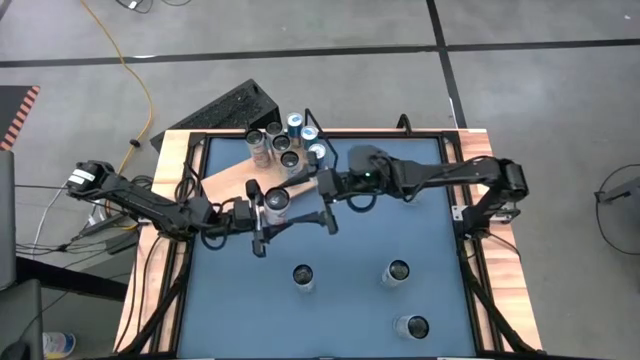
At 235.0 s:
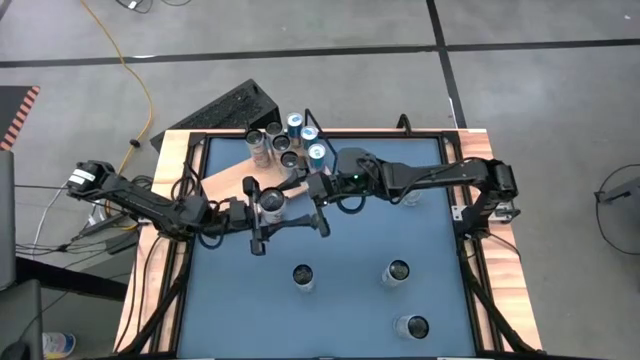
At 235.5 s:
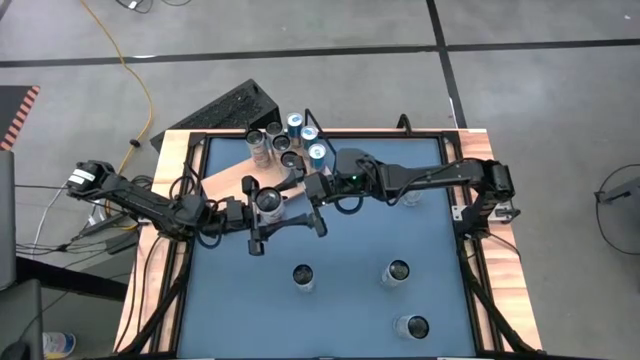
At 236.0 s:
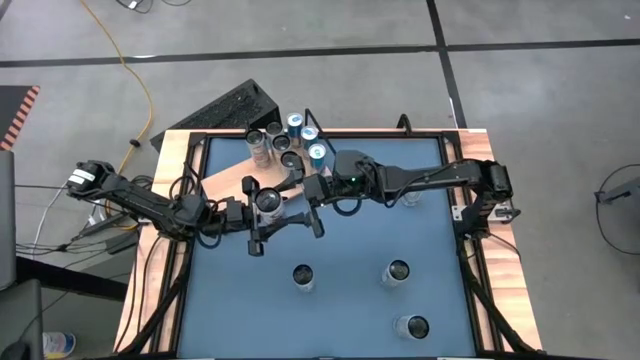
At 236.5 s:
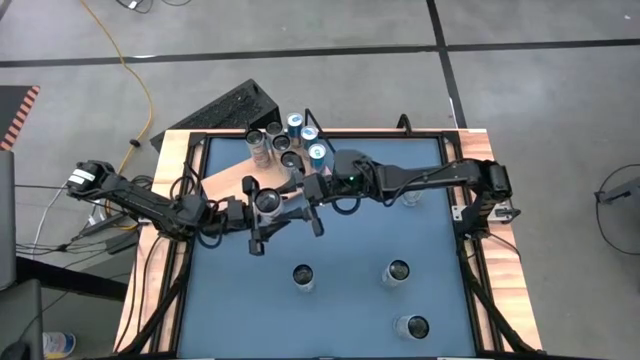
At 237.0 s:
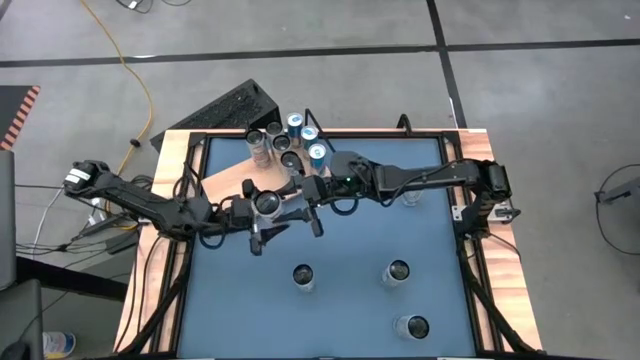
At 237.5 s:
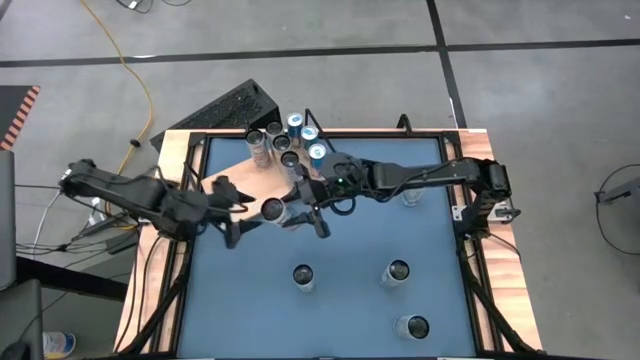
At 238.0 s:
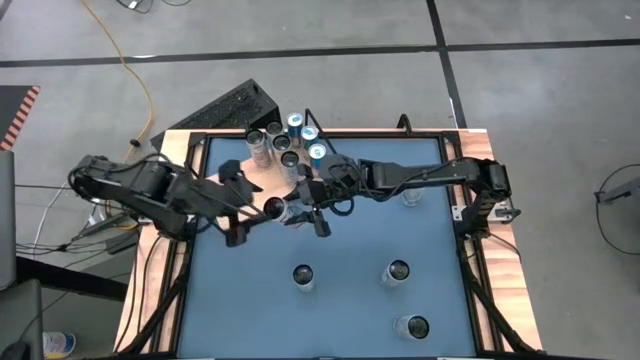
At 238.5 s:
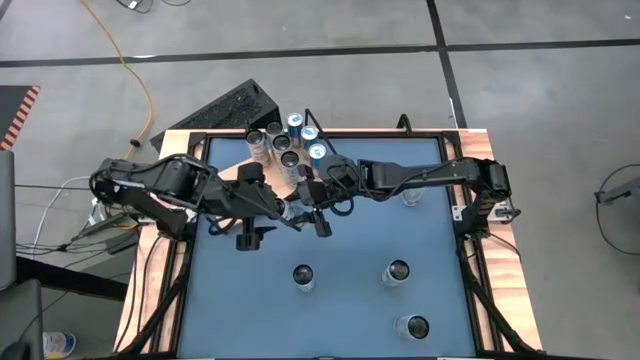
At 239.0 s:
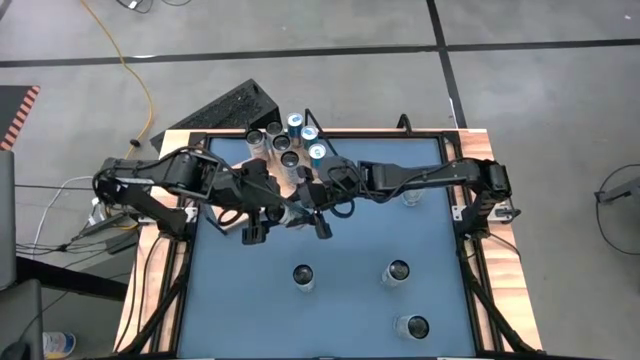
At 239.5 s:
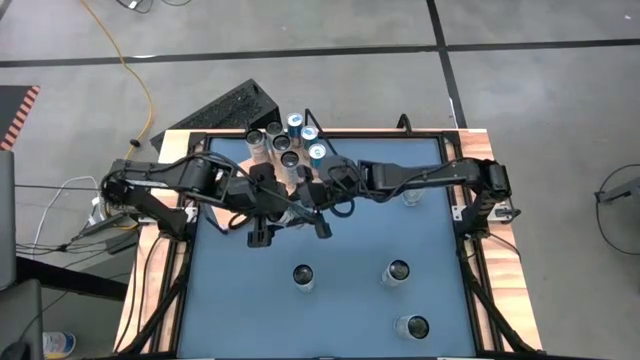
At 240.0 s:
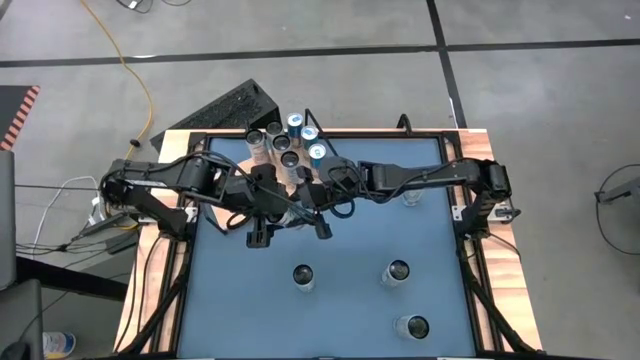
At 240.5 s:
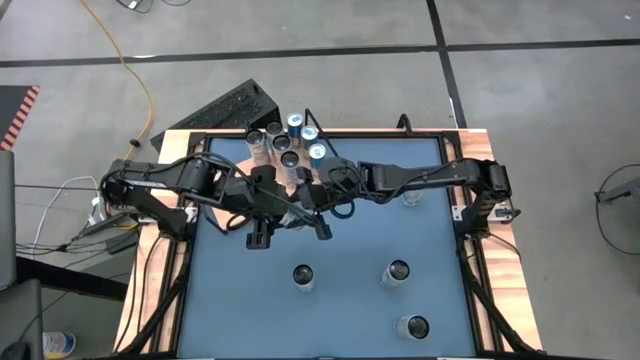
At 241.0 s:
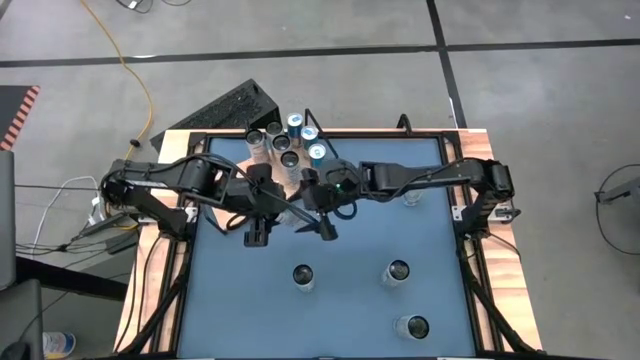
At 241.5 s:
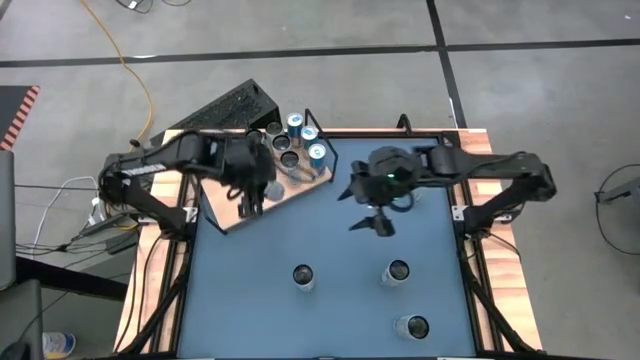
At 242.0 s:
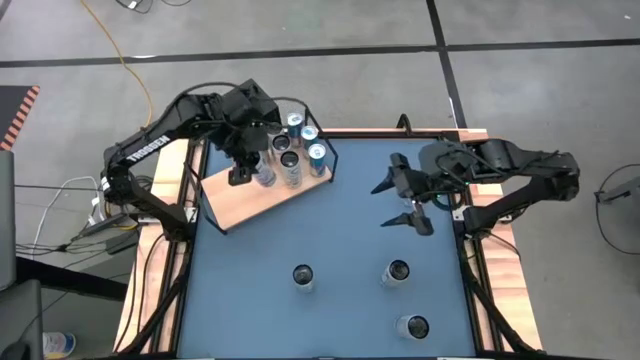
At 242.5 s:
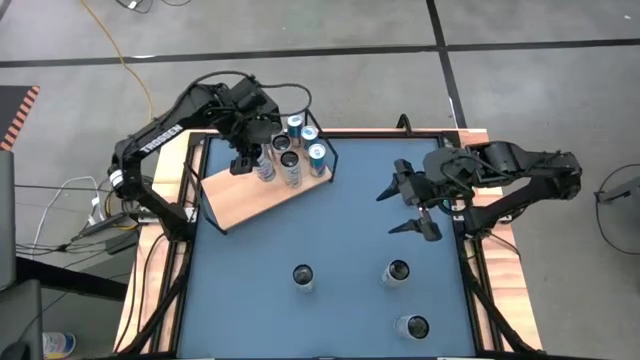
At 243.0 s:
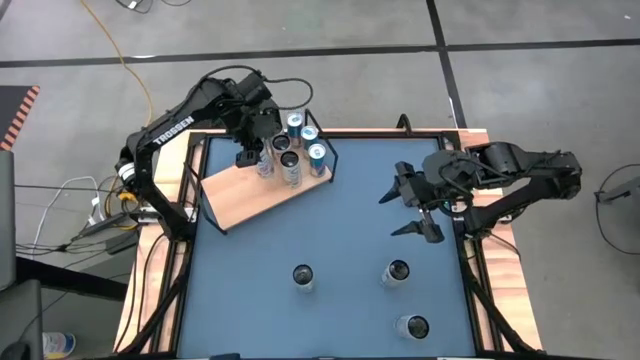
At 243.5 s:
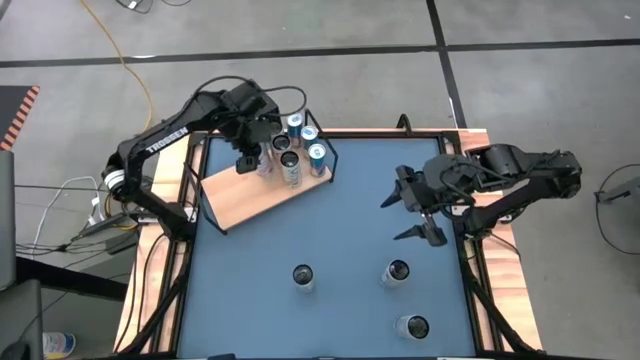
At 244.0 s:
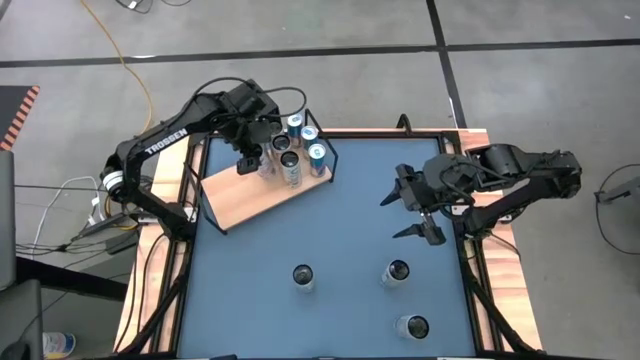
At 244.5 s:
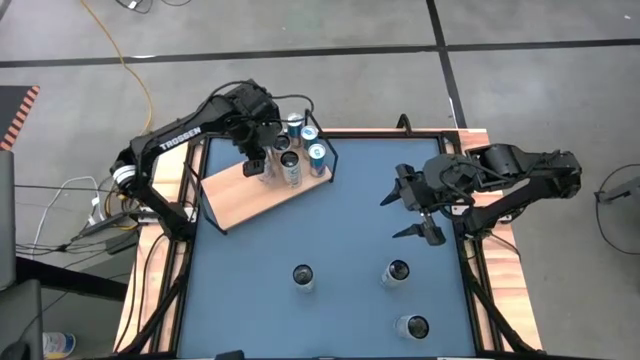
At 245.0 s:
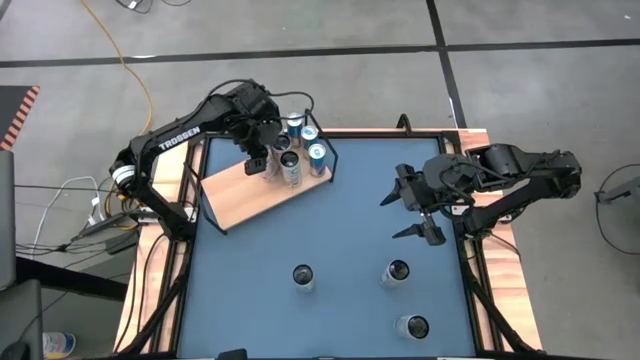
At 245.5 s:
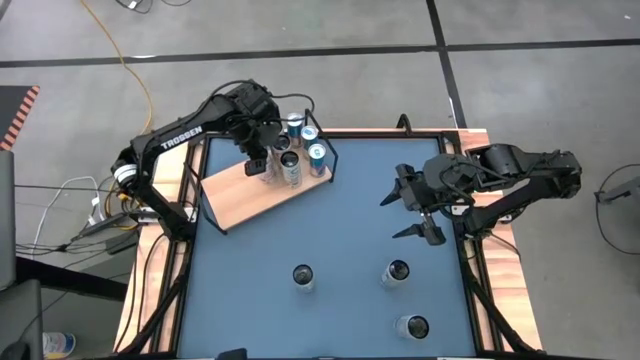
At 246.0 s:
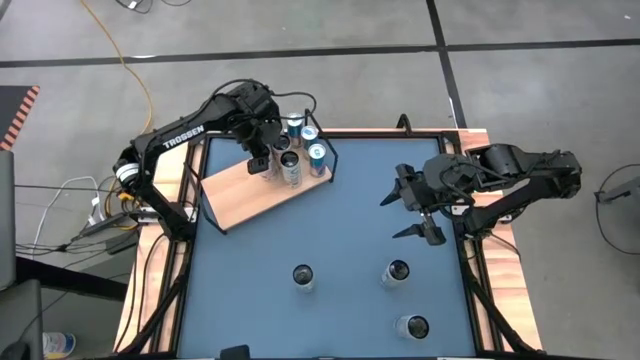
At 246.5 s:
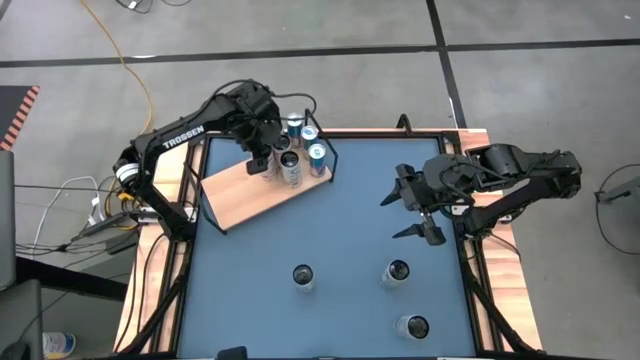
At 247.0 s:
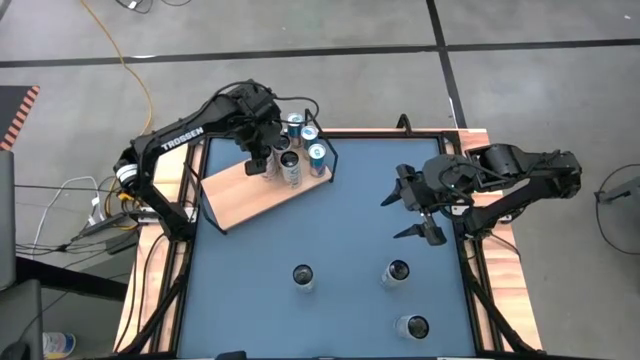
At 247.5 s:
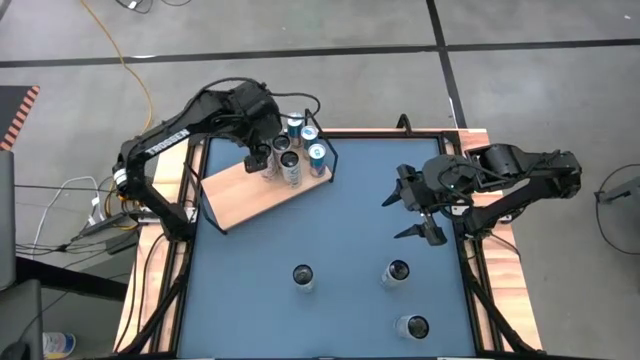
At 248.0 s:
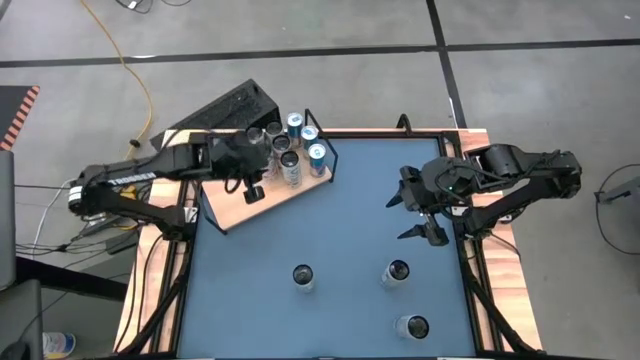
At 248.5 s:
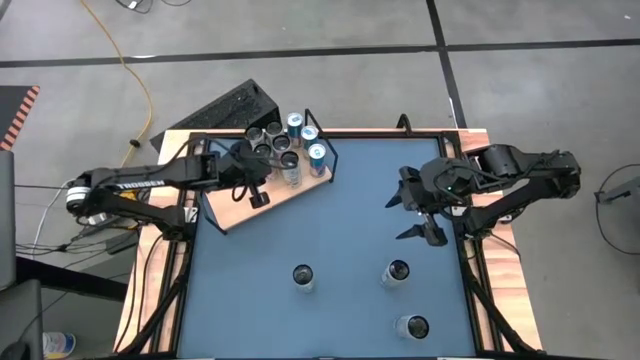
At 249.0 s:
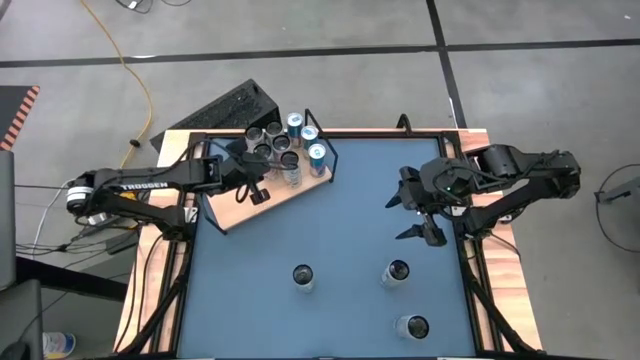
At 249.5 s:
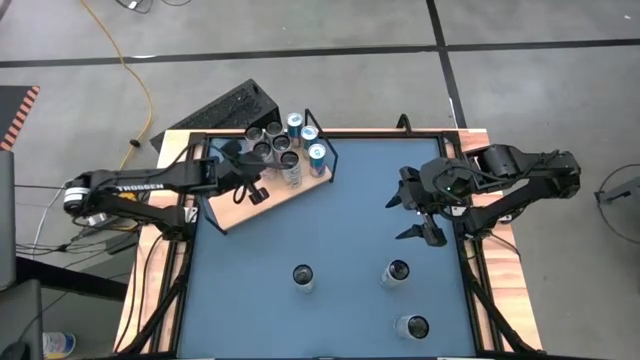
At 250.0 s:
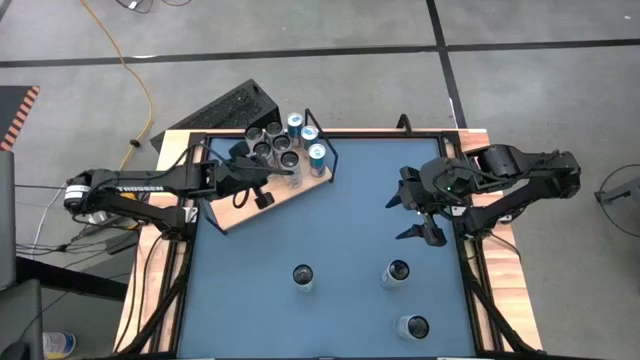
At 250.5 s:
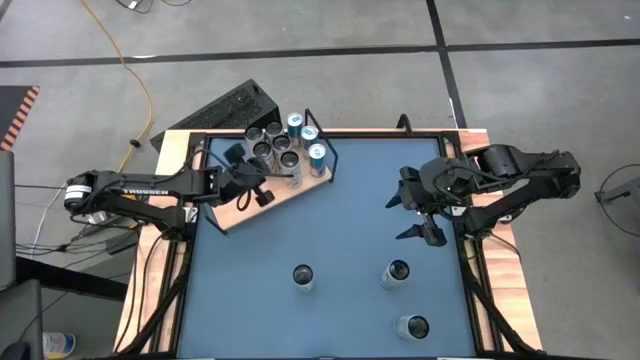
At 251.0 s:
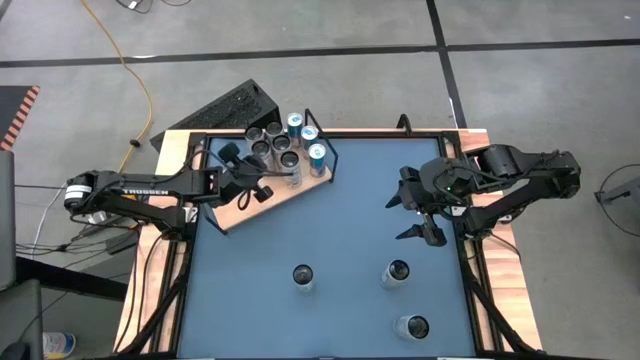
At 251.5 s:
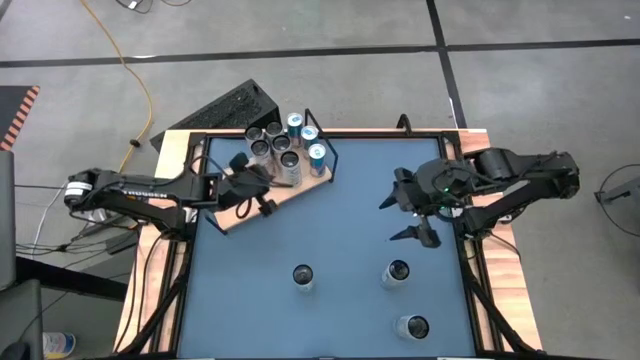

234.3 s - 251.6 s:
Task: Place canned beverage on shelf
Put the top white and pink soda can on the shelf aligned with the other white and pink soda can

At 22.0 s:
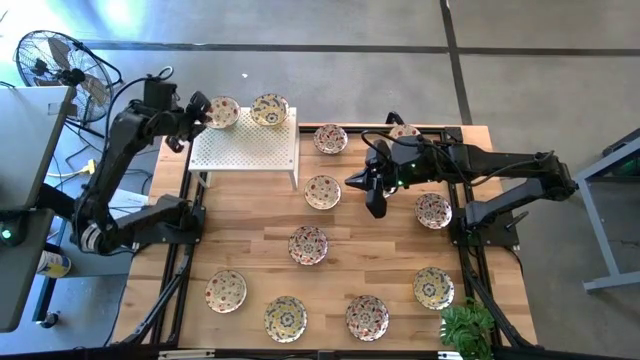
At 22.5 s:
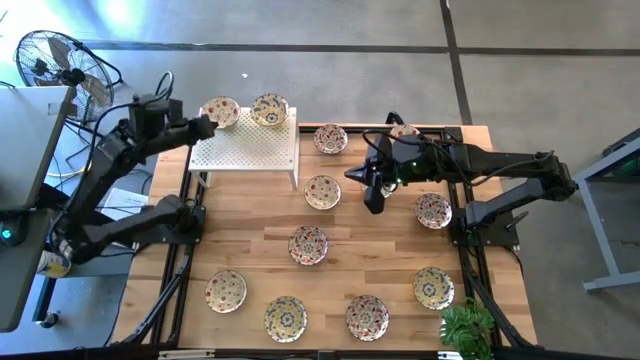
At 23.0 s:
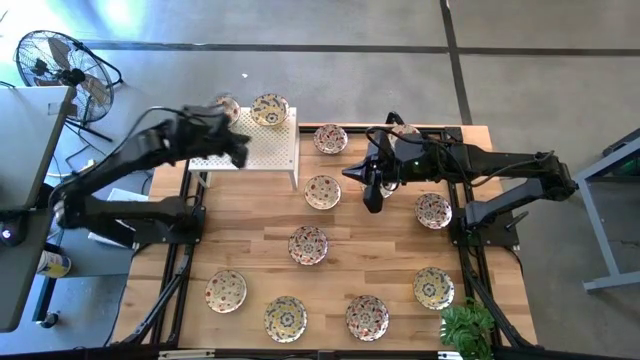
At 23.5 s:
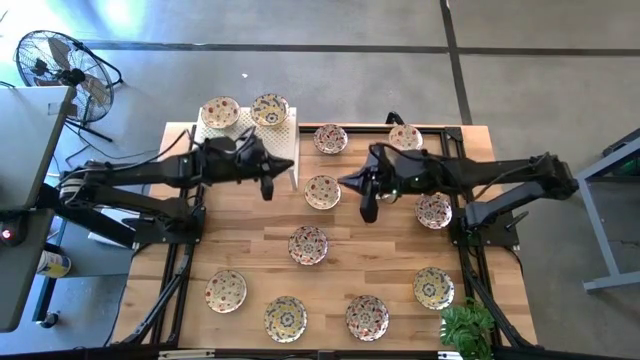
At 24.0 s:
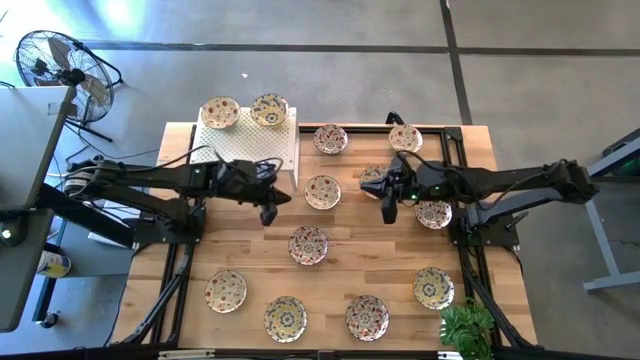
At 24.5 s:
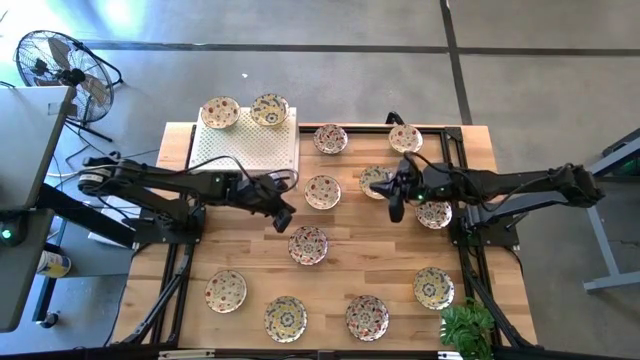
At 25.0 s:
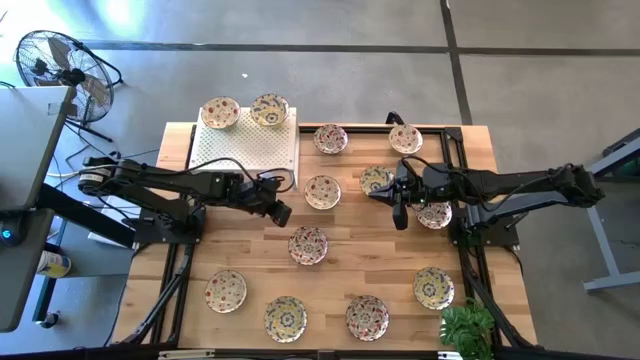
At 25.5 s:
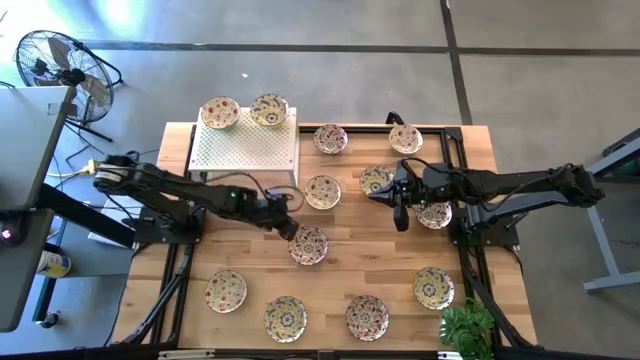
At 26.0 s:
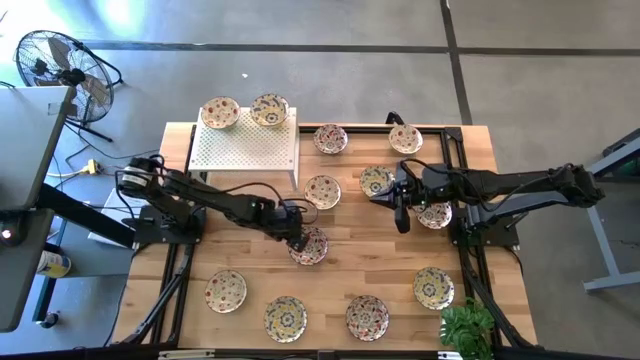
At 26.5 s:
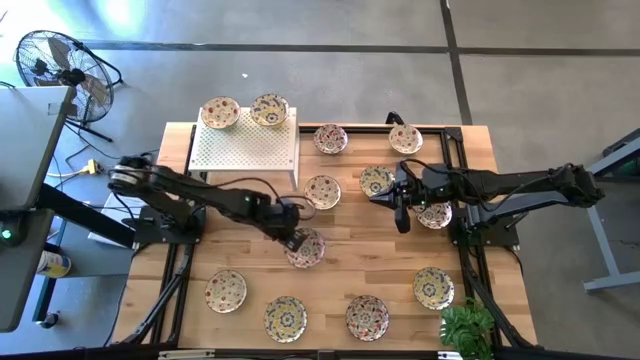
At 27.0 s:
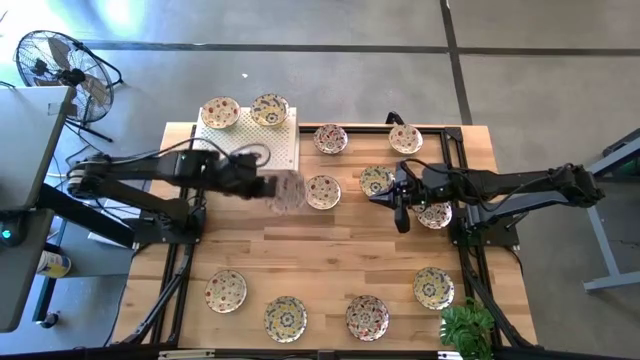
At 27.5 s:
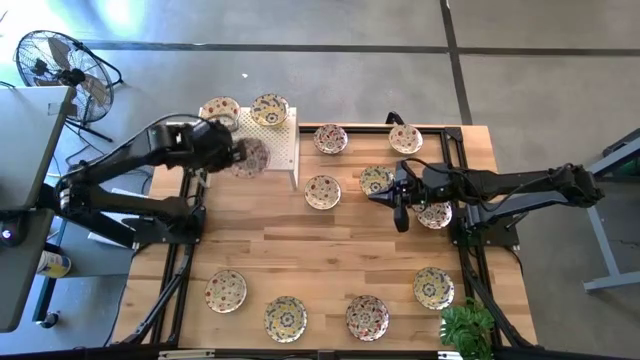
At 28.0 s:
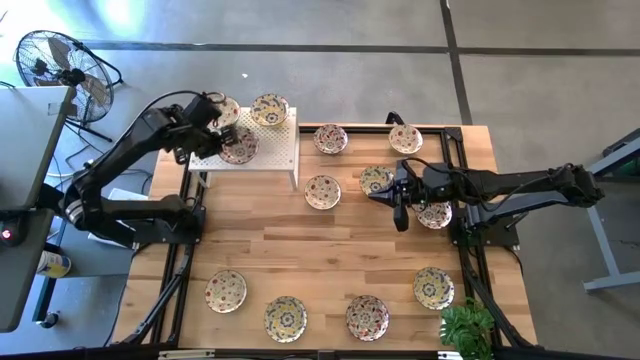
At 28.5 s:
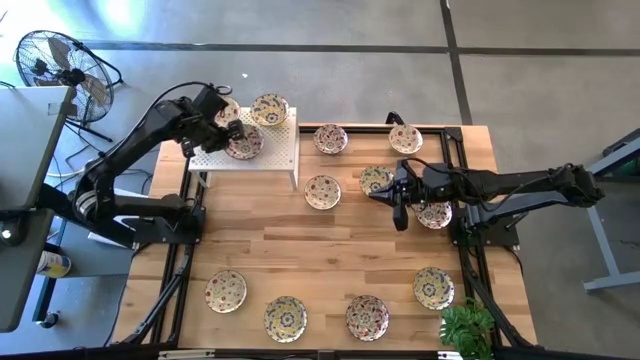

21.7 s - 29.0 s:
Task: Pick & Place Mini bowls
Put the orange patterned bowl on the shelf
